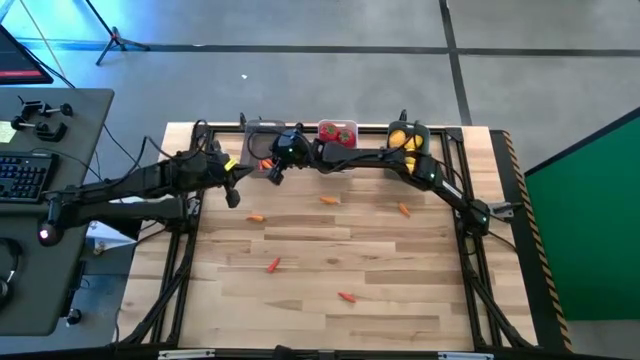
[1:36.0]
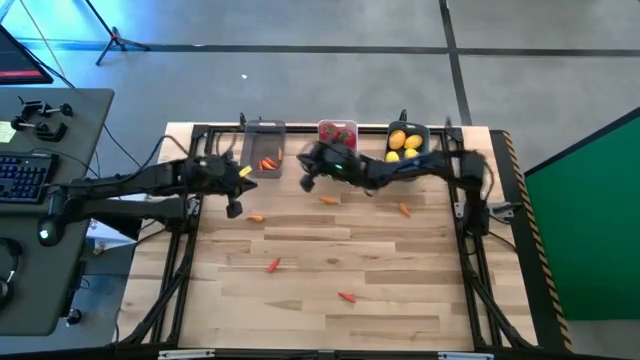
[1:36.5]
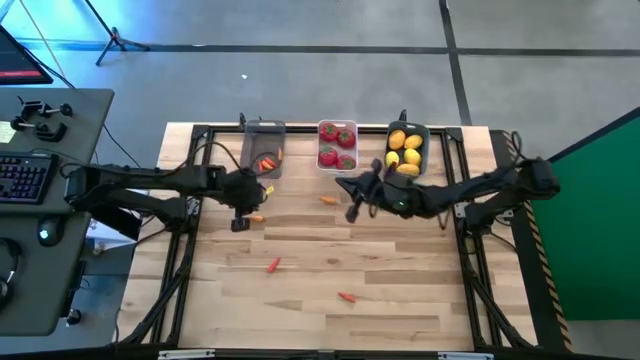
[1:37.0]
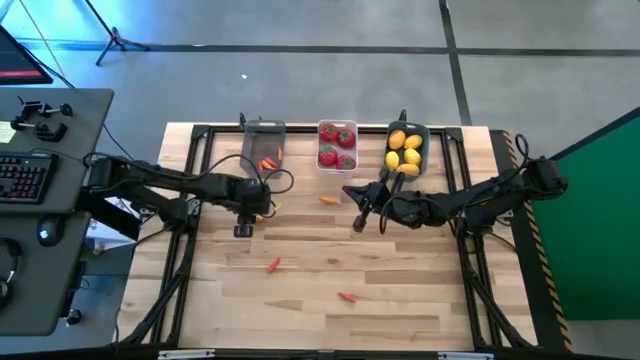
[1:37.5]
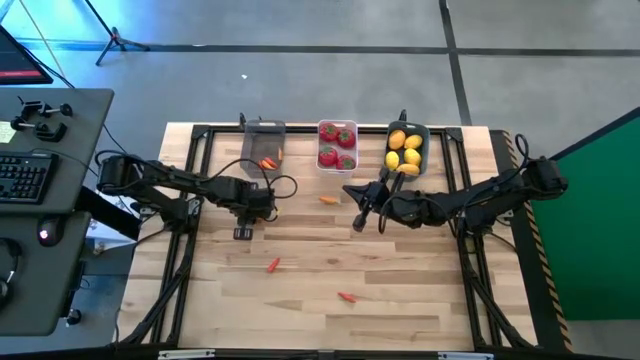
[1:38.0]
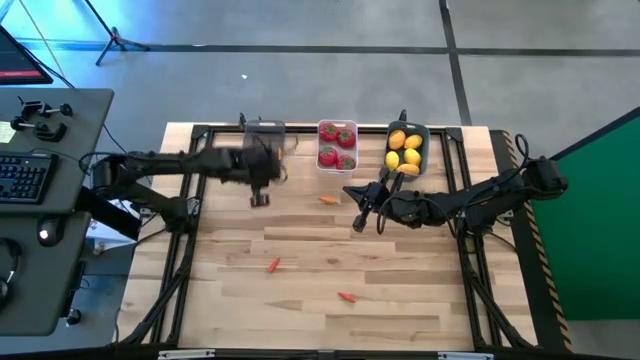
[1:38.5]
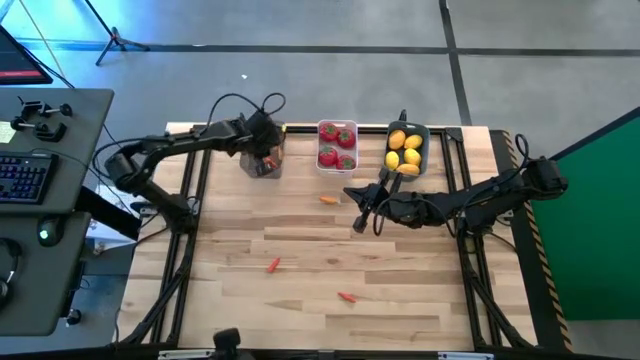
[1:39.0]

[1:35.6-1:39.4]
Task: Sort produce into baskets
Put the orange chili pepper into the black bin

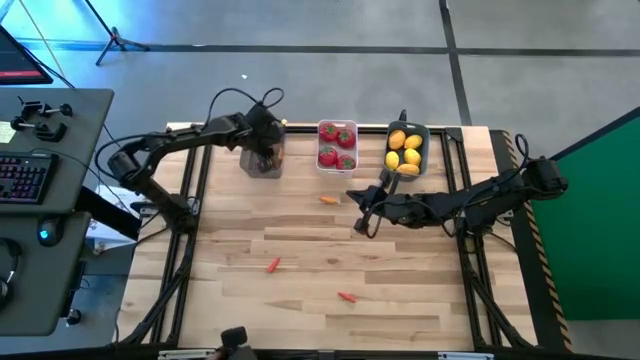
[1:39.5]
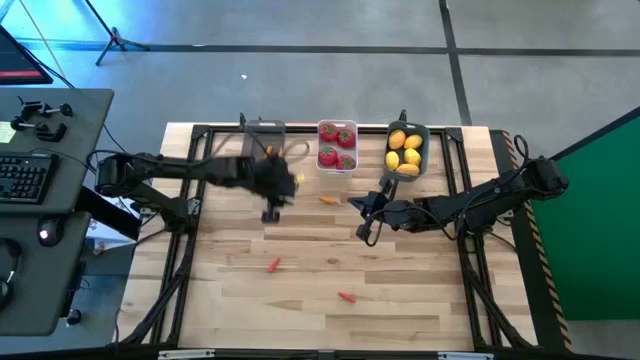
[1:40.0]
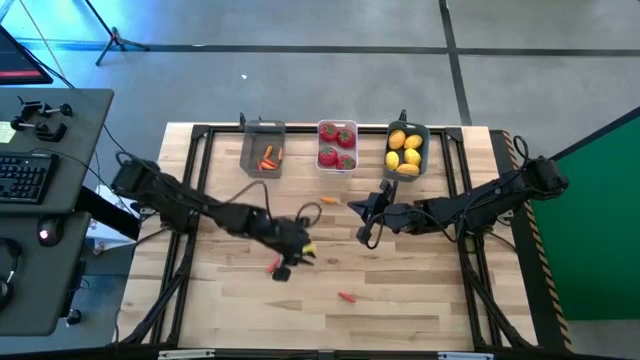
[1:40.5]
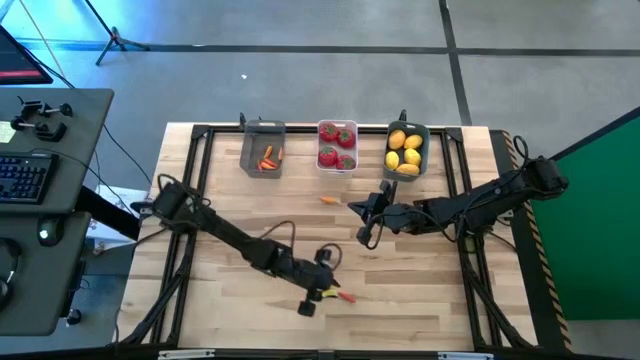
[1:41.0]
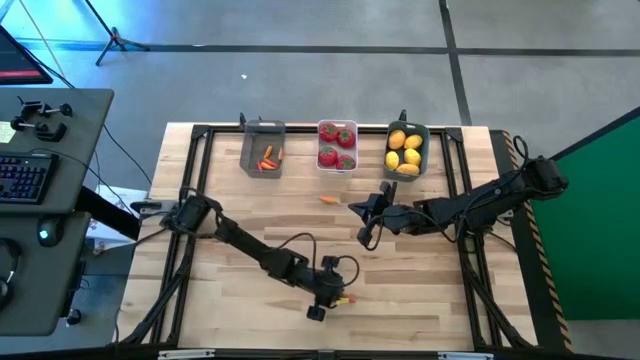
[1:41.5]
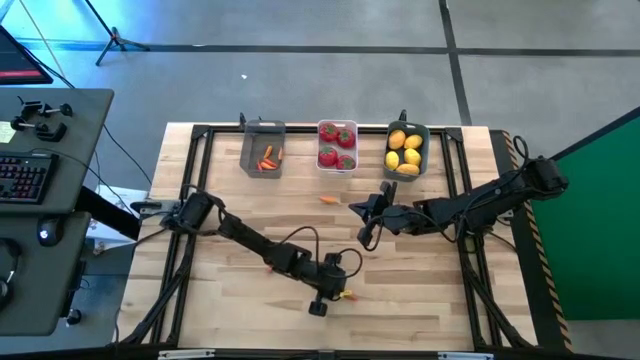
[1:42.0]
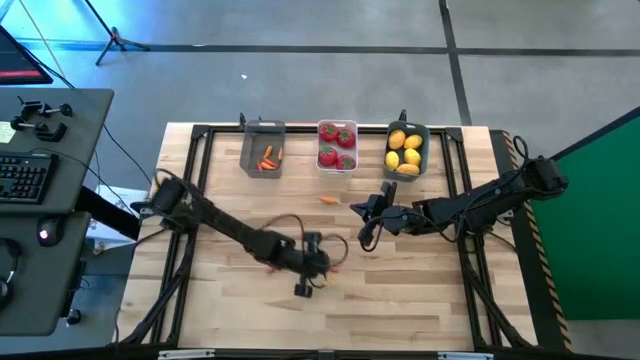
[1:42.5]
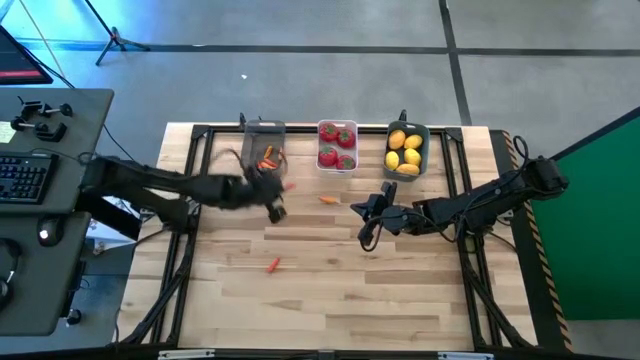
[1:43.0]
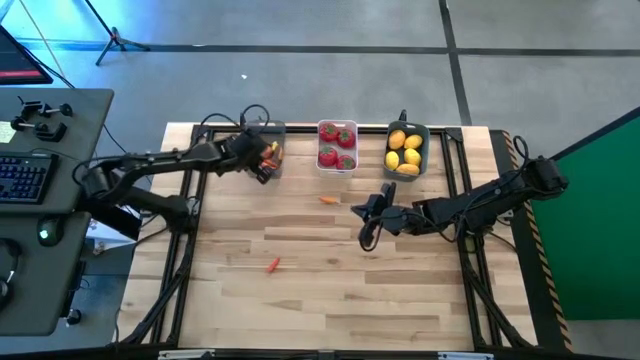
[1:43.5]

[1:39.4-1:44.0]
Put the red chili pepper into the black bin

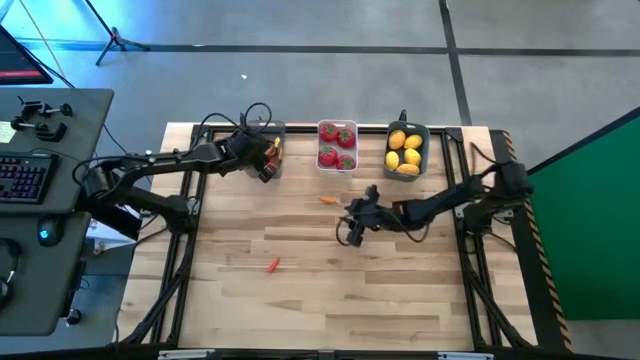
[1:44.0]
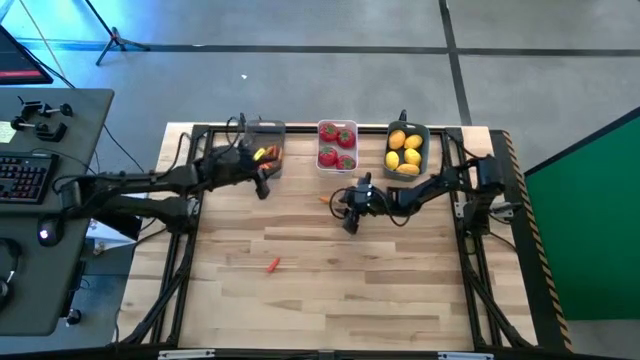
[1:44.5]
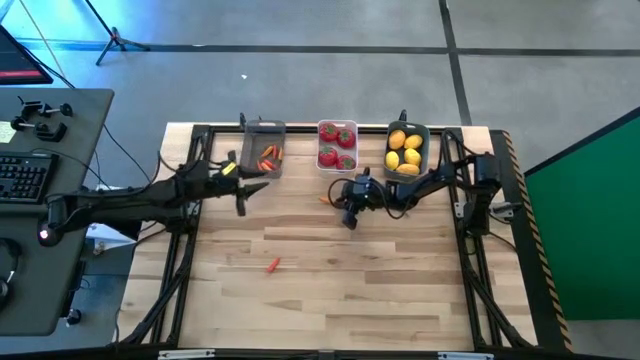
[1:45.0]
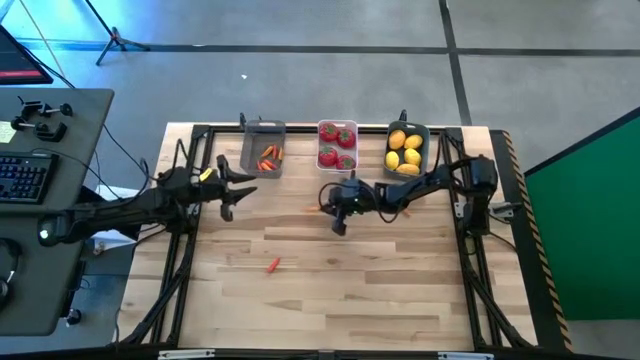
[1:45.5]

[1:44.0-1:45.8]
Put the orange chili pepper into the black bin

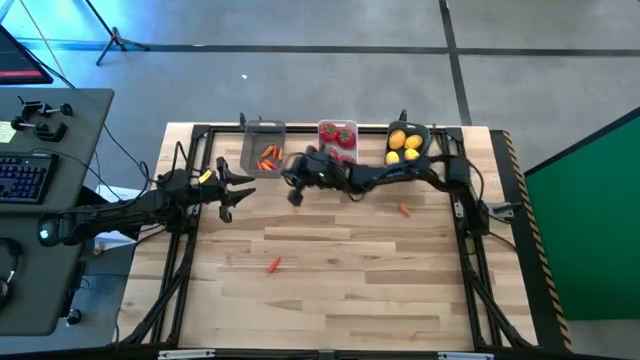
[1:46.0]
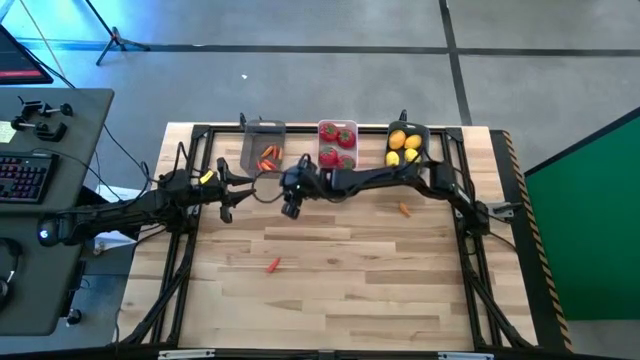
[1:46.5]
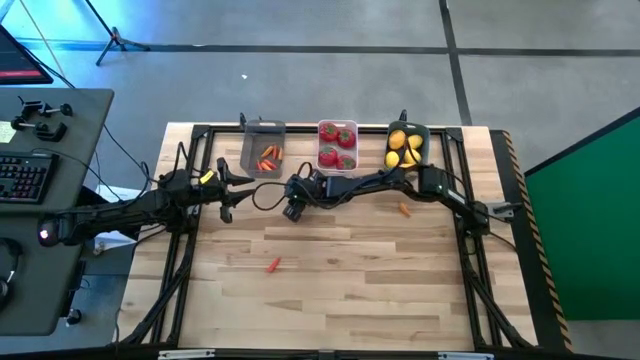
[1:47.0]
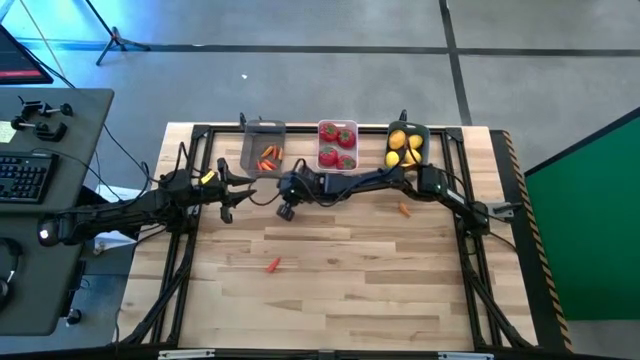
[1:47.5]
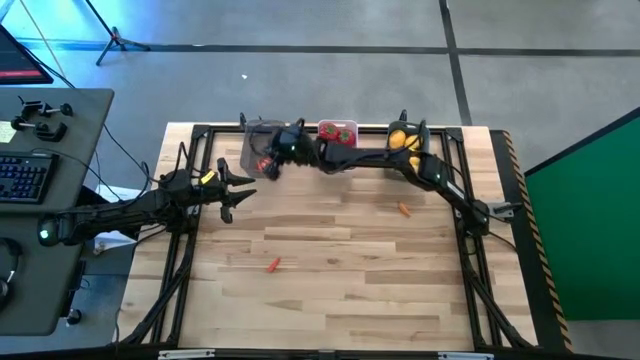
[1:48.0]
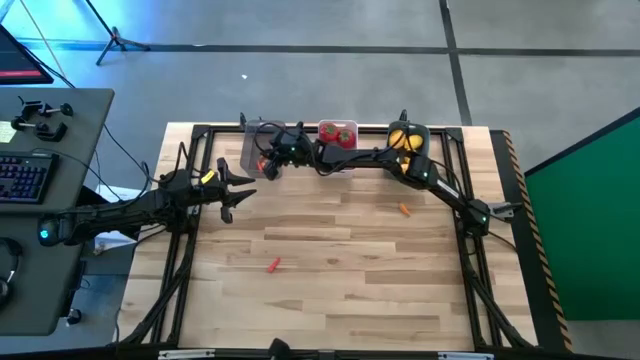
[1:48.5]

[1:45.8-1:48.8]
Put the orange chili pepper into the black bin

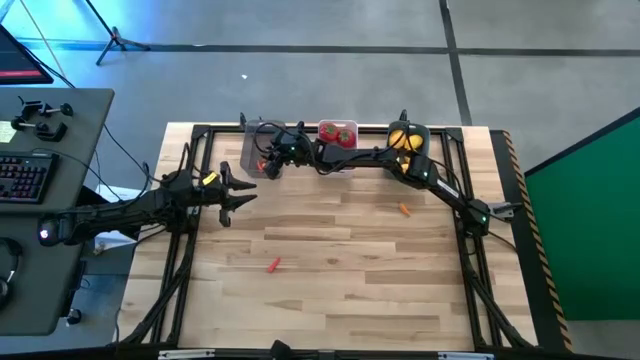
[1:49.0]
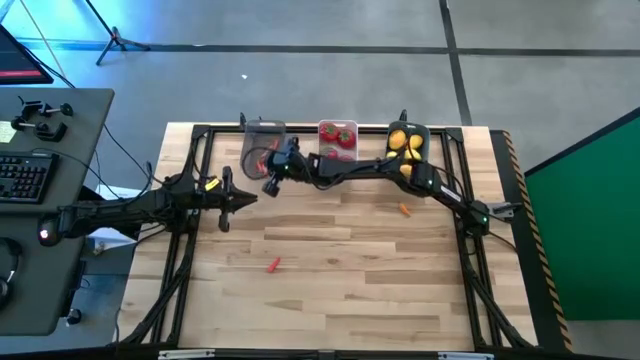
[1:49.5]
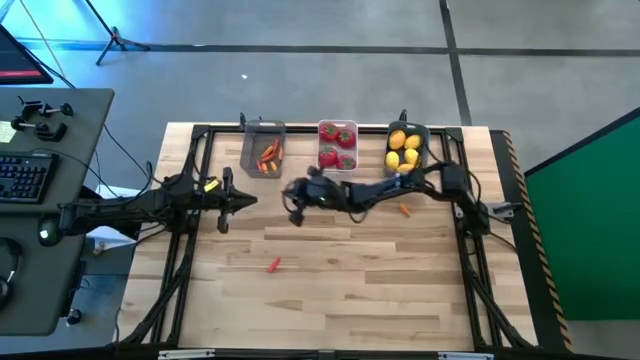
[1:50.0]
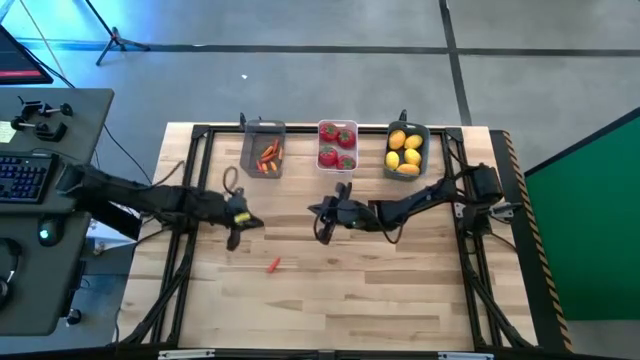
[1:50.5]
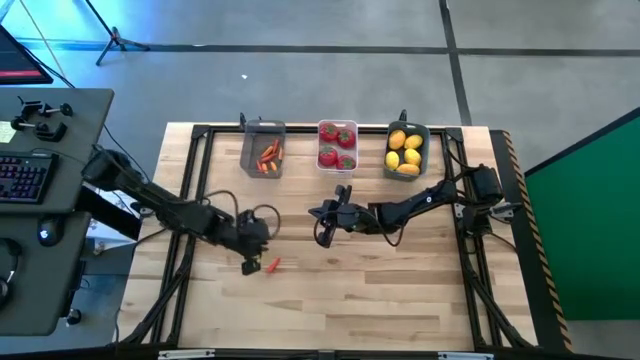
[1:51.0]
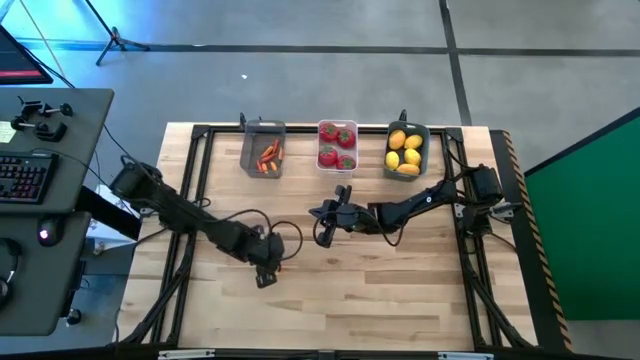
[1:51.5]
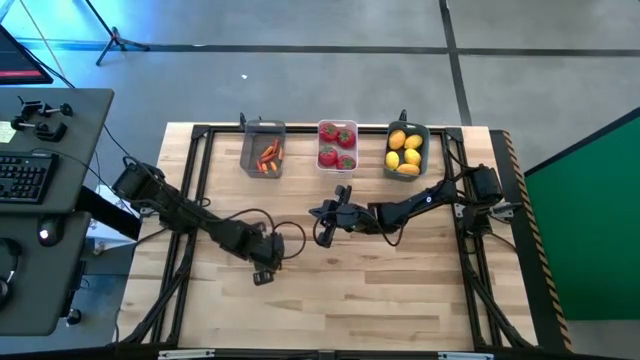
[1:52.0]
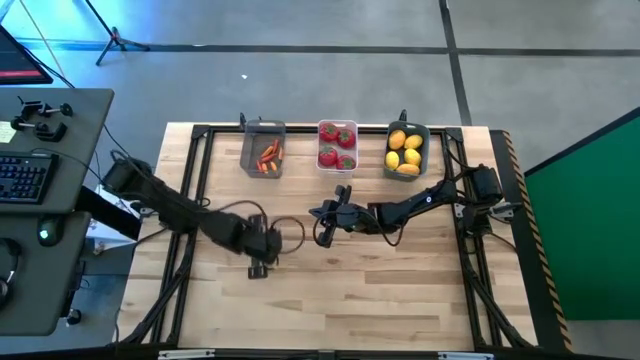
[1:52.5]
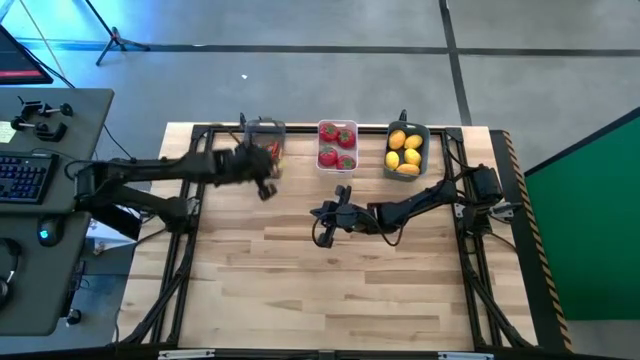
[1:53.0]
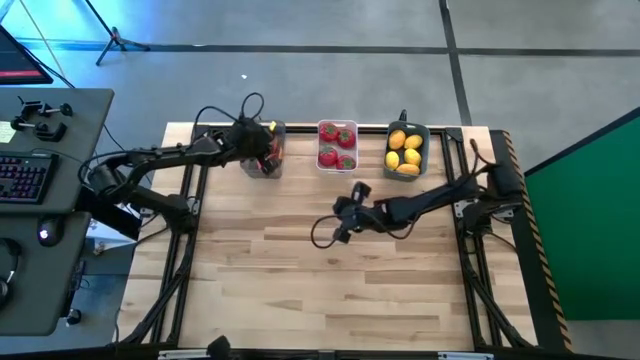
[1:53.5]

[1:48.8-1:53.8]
Put the red chili pepper into the black bin

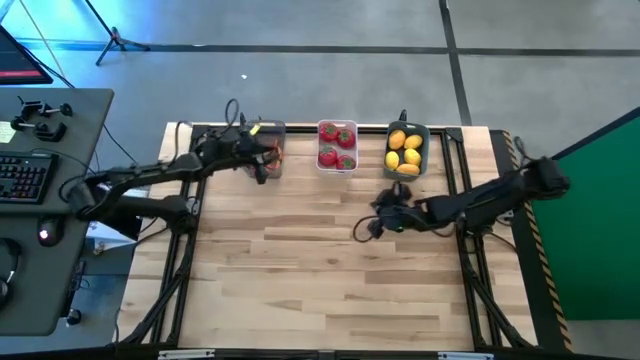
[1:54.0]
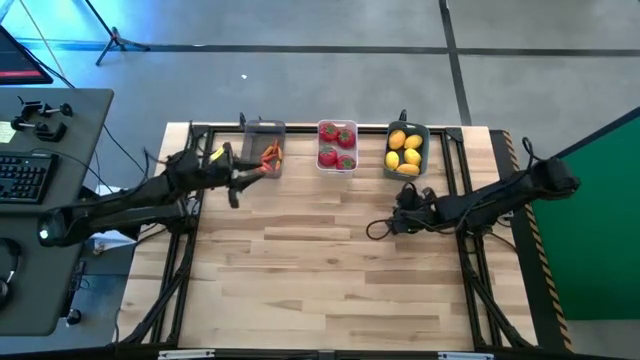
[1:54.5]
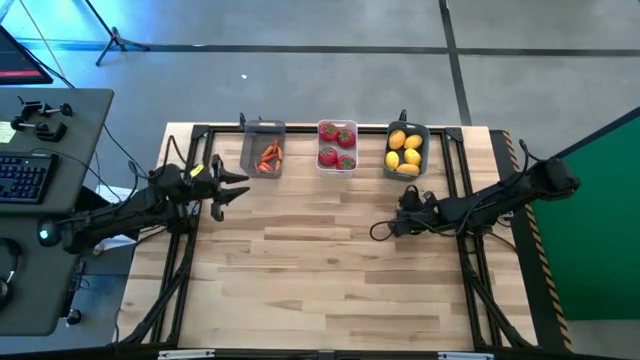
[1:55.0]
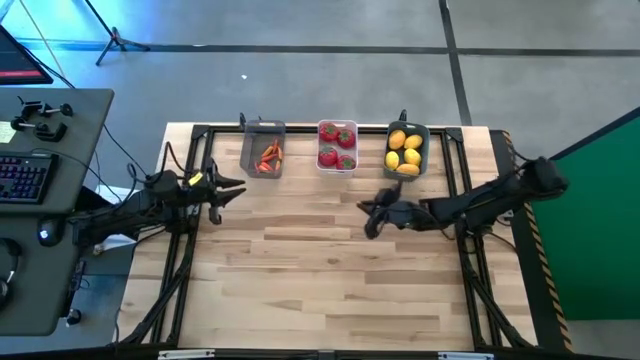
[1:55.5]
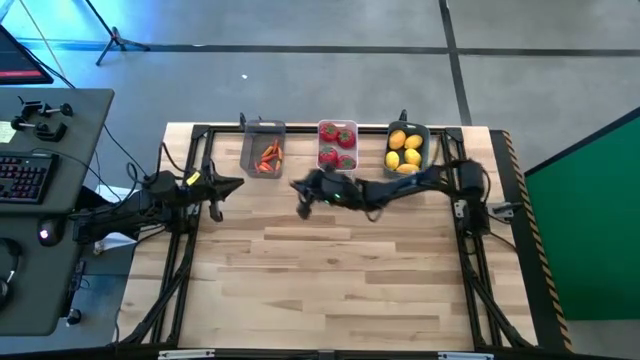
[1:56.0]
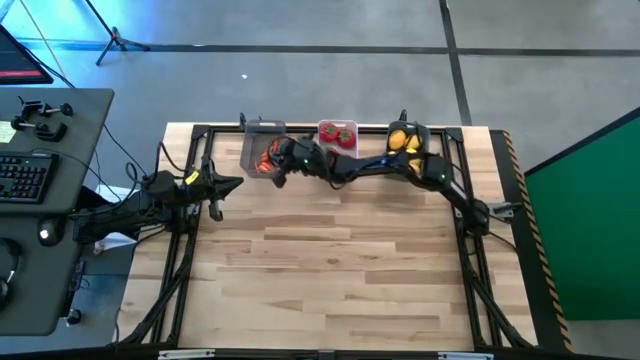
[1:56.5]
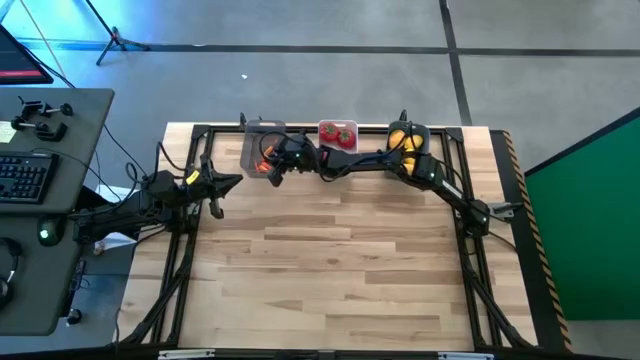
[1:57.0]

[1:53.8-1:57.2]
Put the orange chili pepper into the black bin
